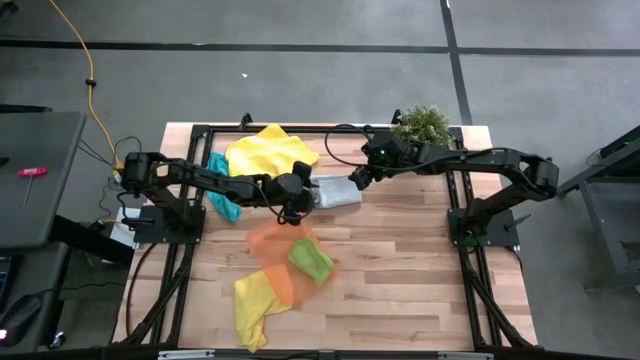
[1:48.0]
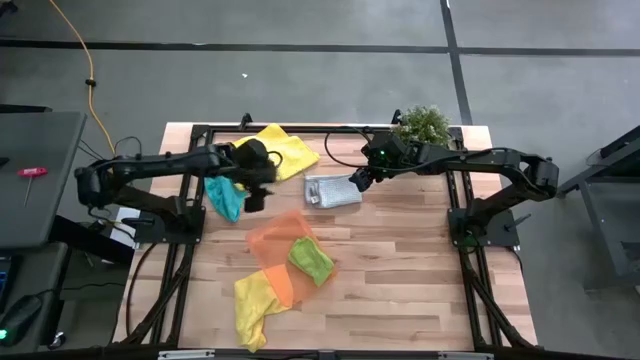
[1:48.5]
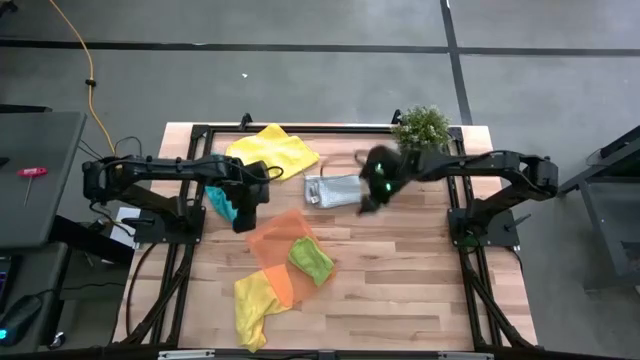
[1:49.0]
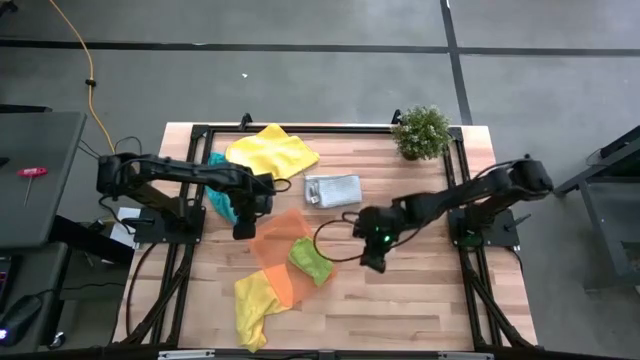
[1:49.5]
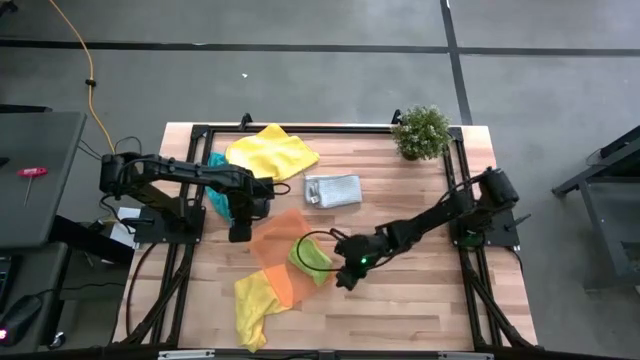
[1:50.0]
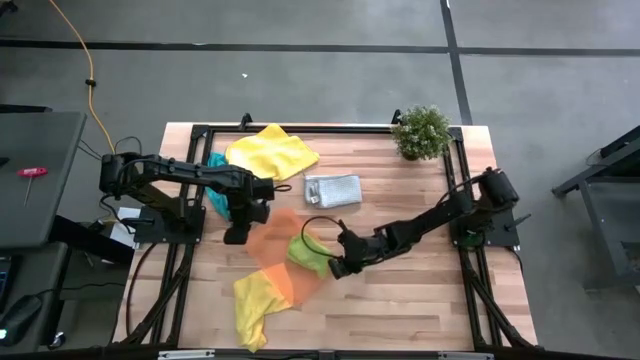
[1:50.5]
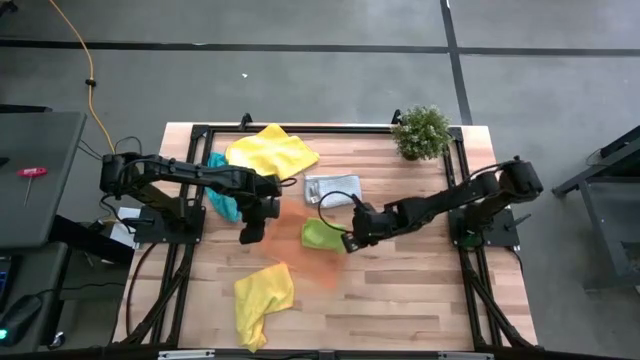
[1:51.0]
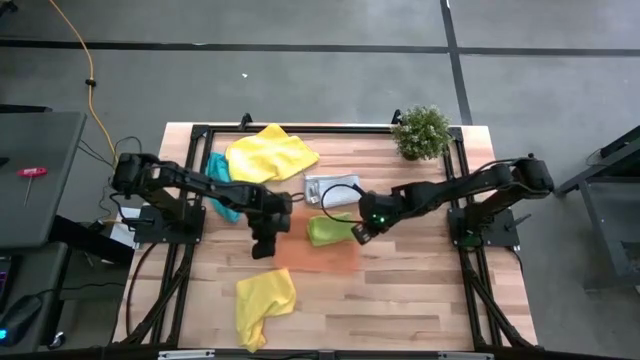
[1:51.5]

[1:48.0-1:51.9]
Task: Fold microfiber towels
Adjust the bin on the table

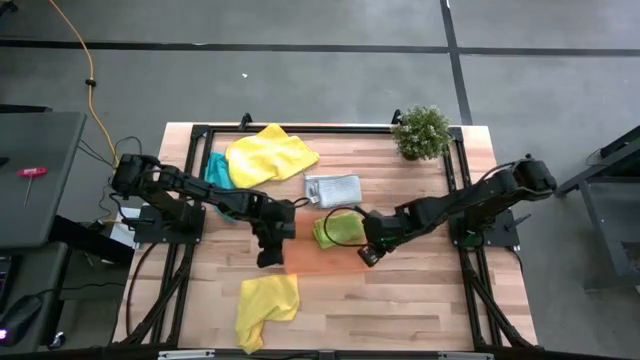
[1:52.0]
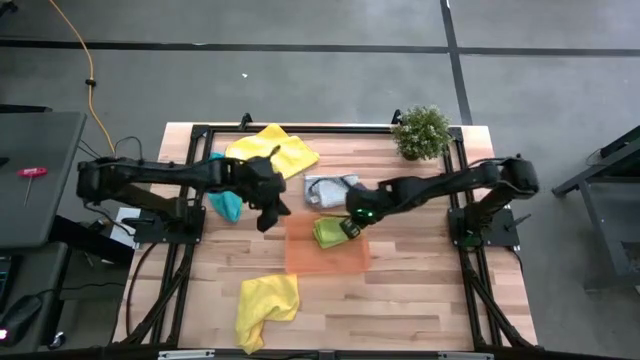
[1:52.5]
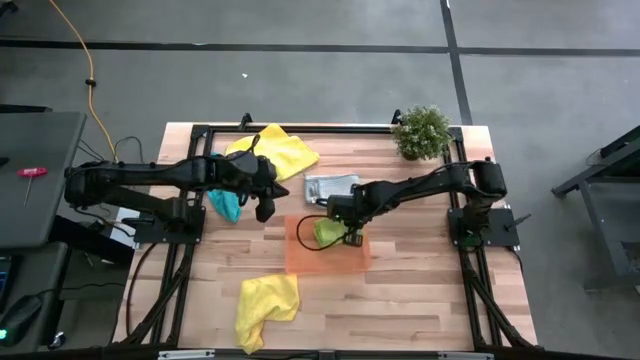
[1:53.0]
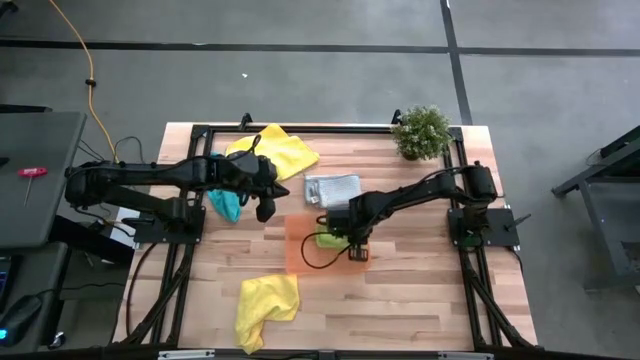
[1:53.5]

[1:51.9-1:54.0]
Adjust the green towel in the bin

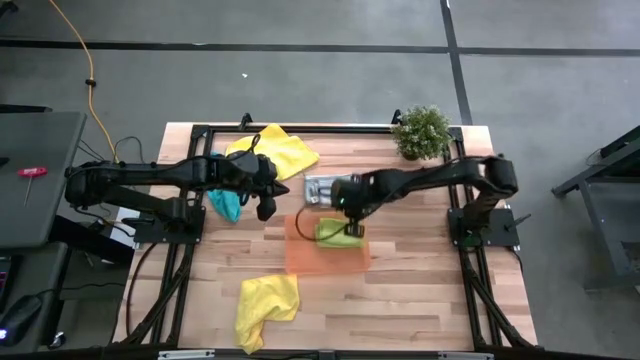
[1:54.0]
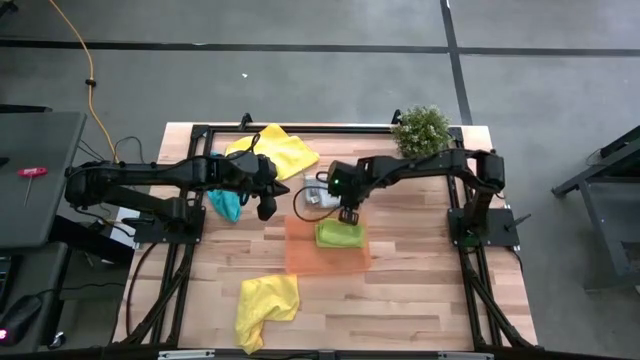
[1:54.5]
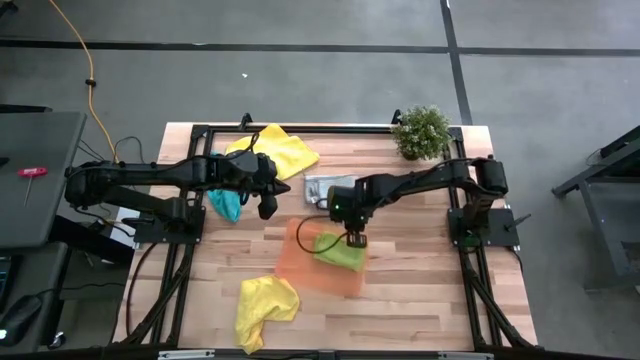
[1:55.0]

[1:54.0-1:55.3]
Adjust the bin on the table

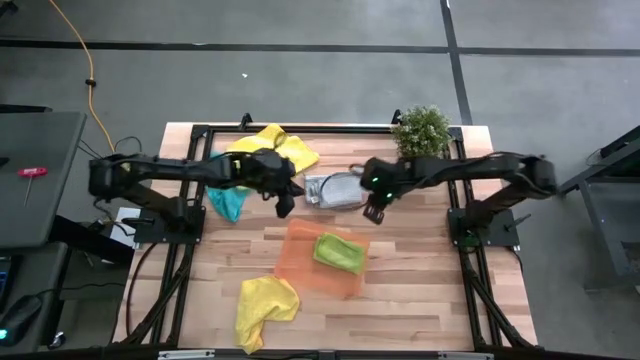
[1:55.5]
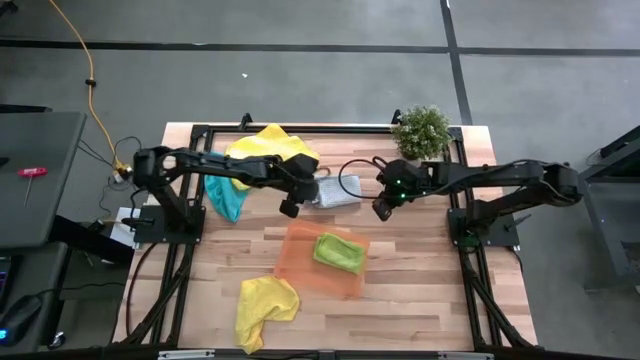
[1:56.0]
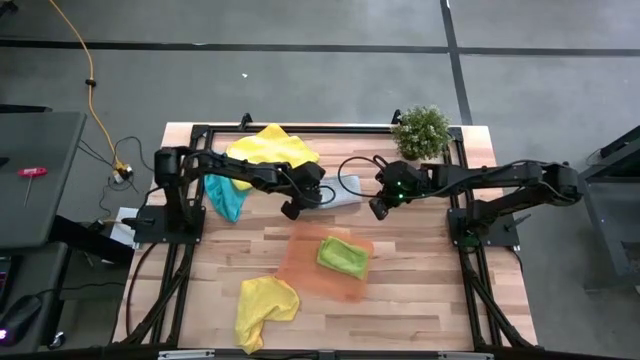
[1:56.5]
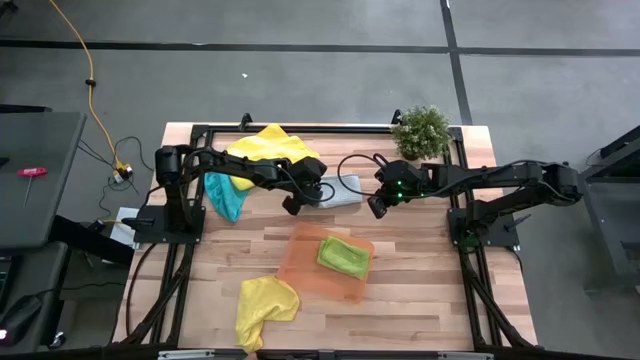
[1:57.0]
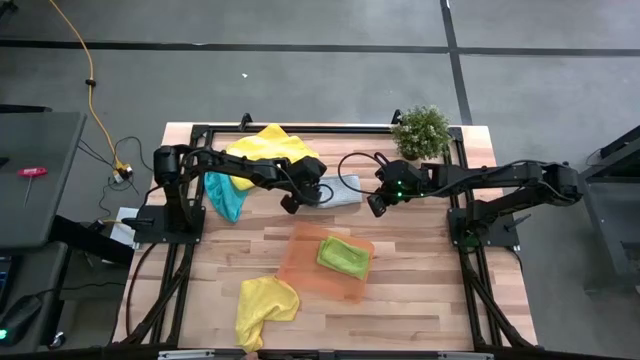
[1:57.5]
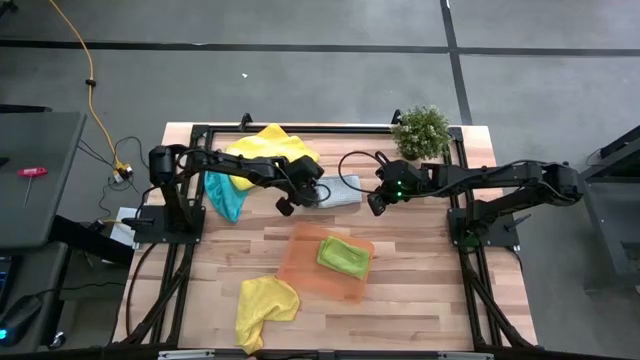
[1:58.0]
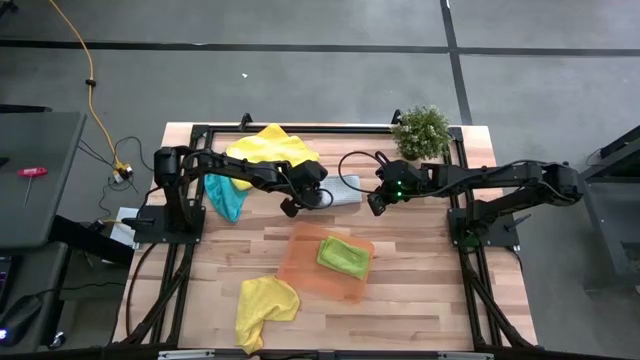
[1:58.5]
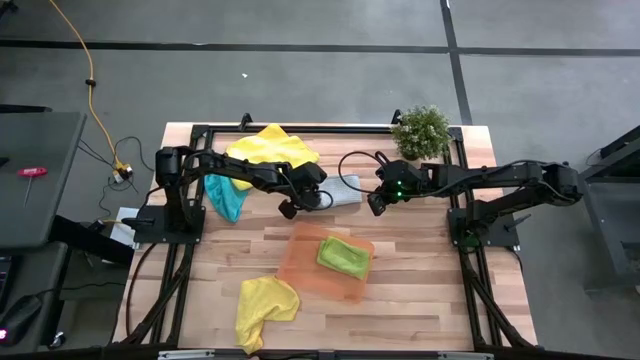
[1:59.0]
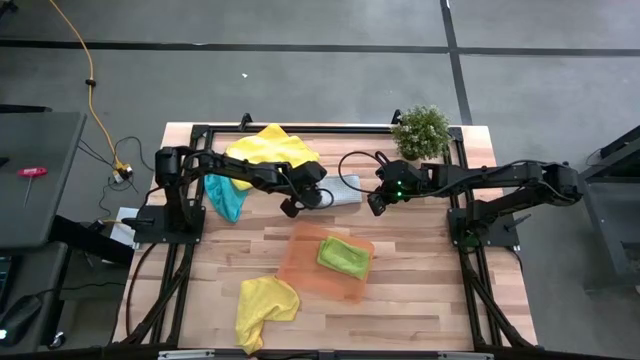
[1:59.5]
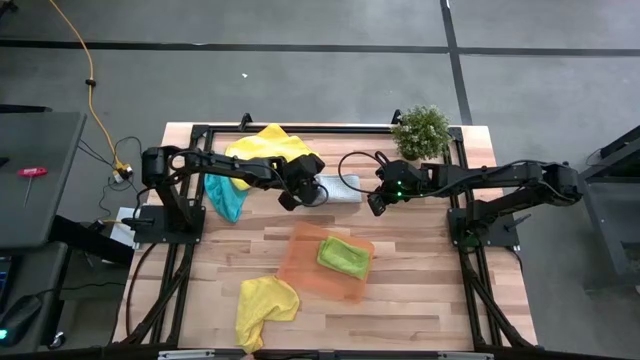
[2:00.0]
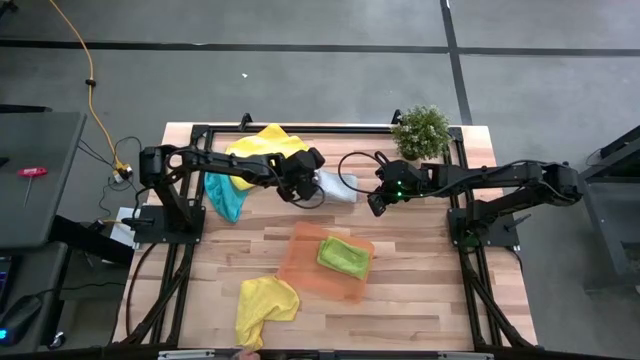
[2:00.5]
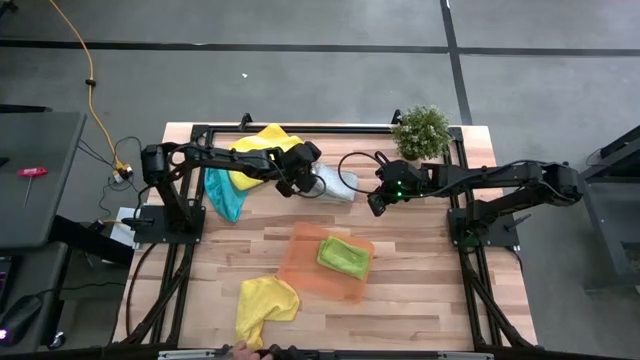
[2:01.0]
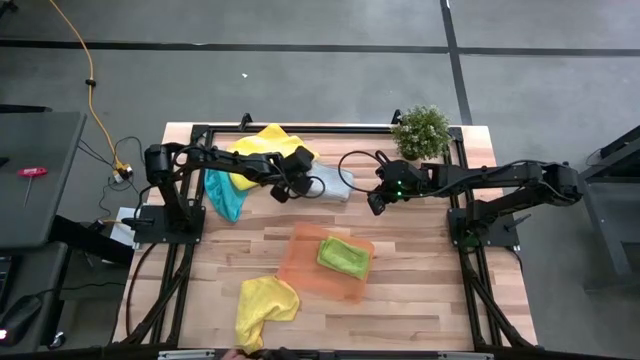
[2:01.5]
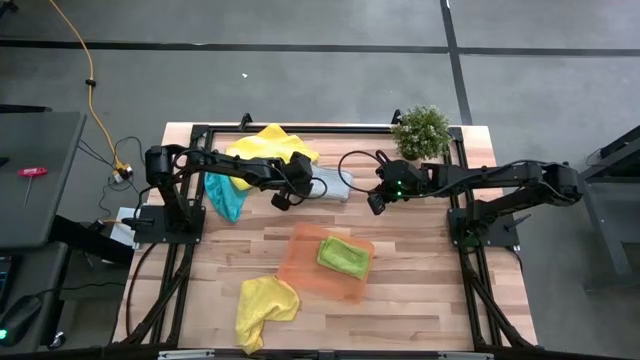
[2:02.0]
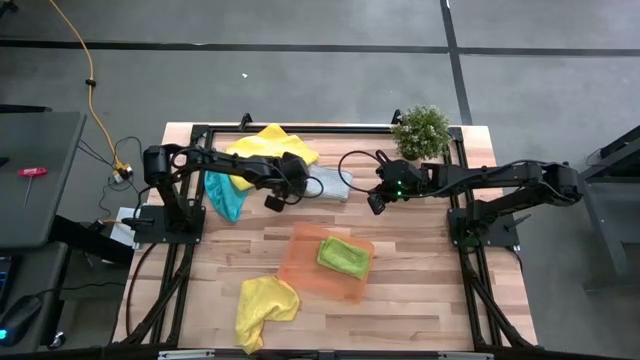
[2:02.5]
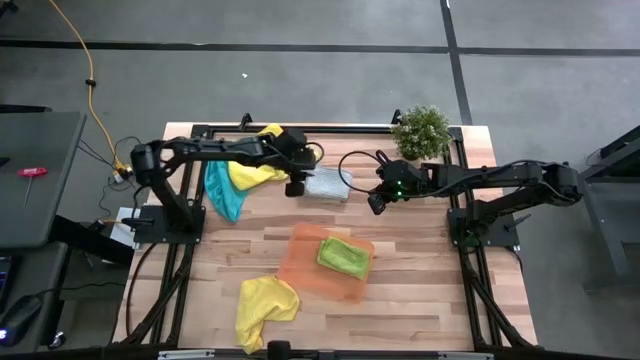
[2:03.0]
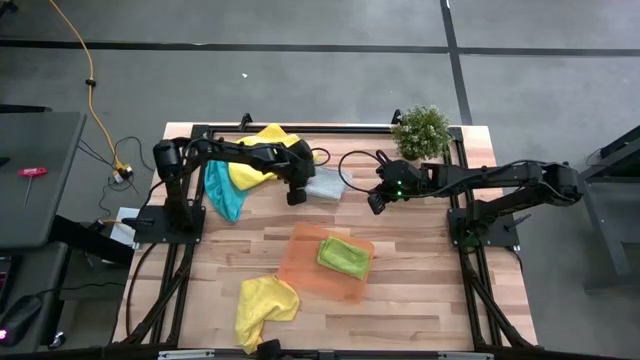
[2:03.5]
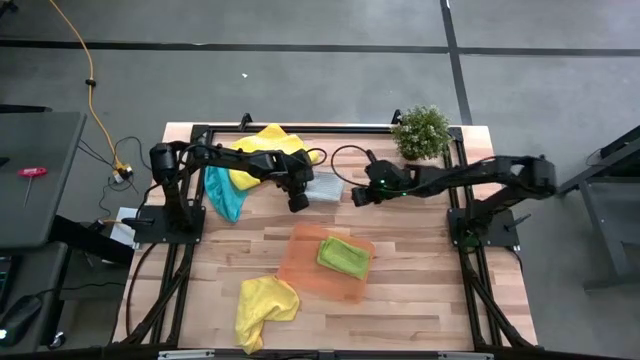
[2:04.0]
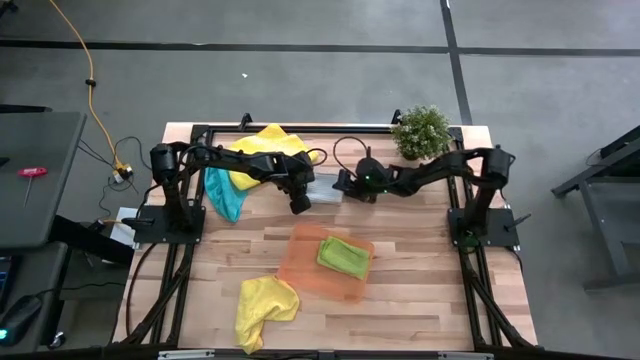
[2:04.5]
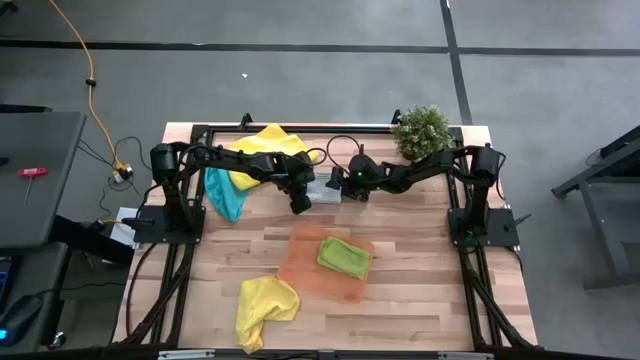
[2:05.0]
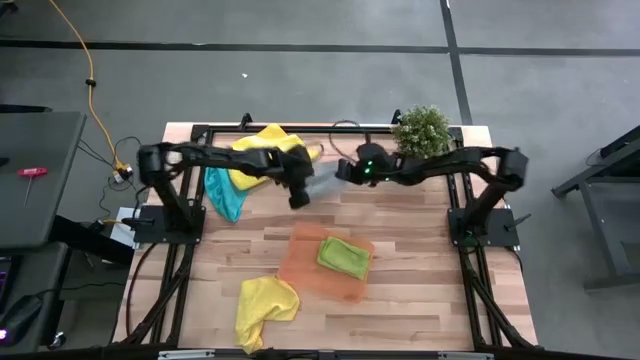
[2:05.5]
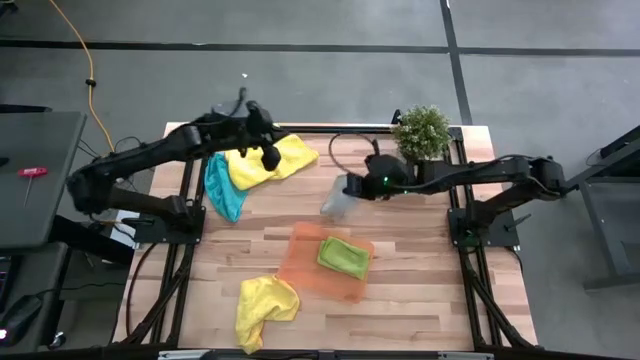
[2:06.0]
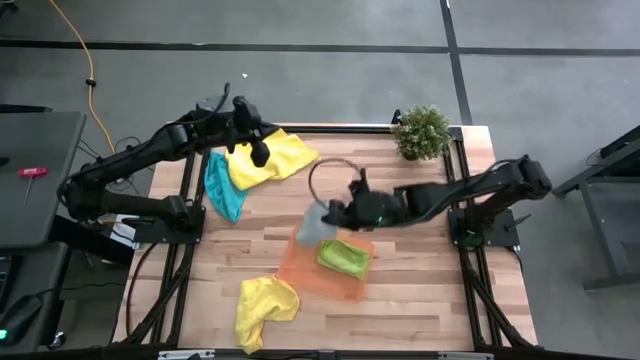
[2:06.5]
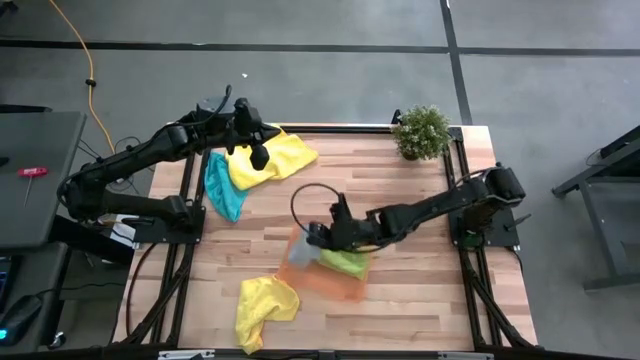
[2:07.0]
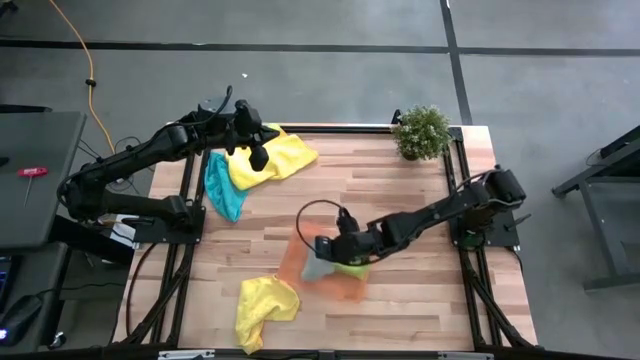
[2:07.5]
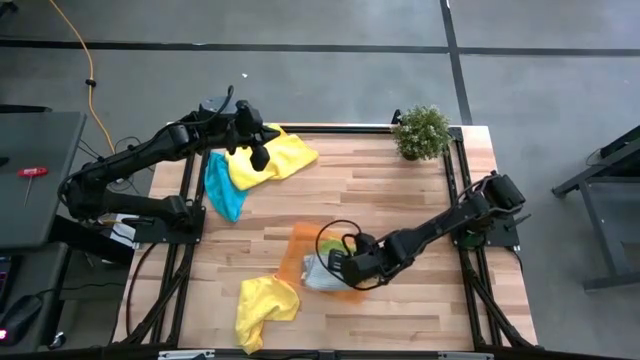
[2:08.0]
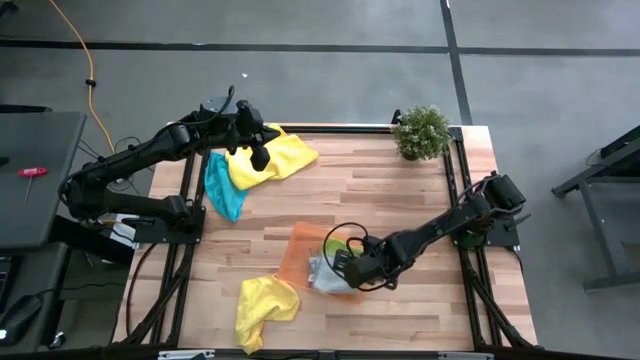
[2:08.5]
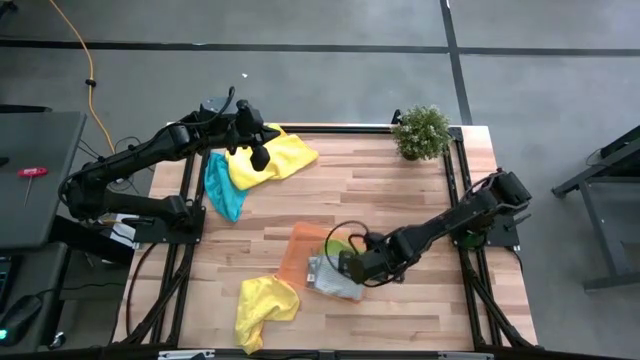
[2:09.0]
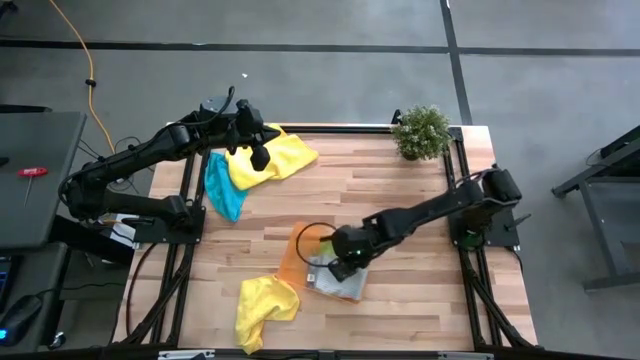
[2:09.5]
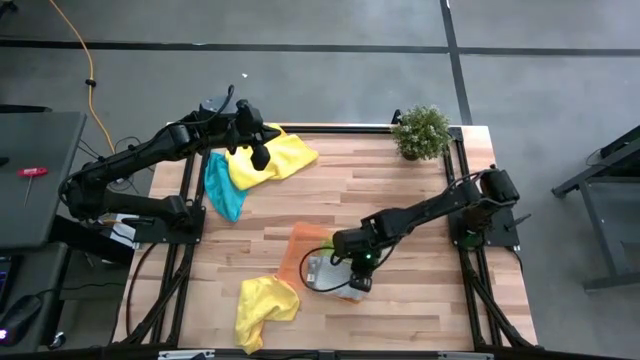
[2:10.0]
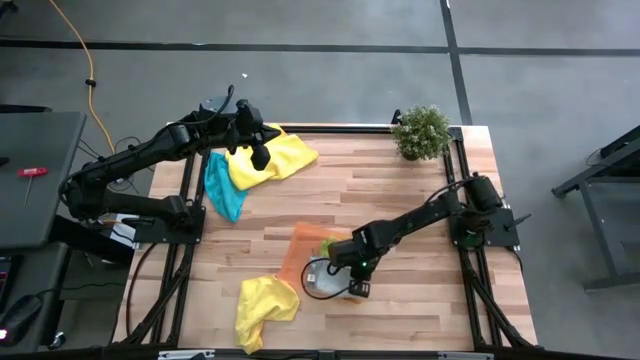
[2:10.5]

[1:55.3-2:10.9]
Put the gray towel into the bin
